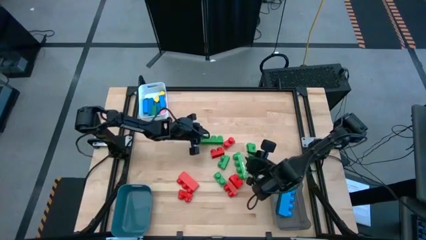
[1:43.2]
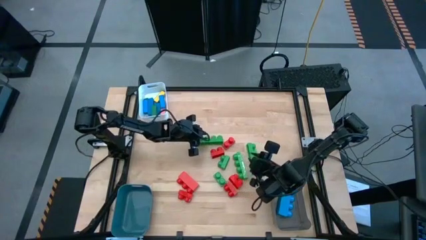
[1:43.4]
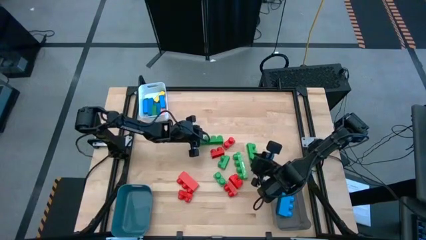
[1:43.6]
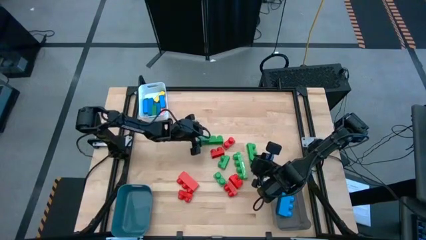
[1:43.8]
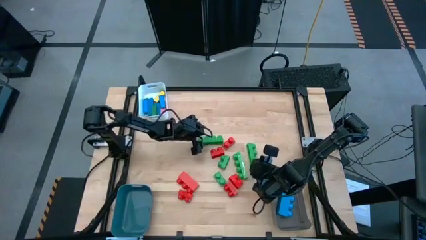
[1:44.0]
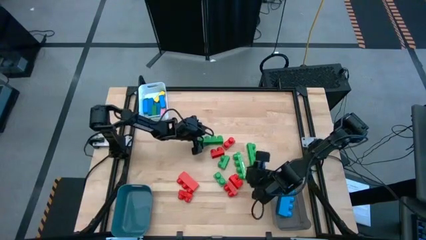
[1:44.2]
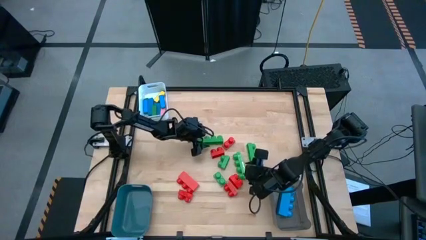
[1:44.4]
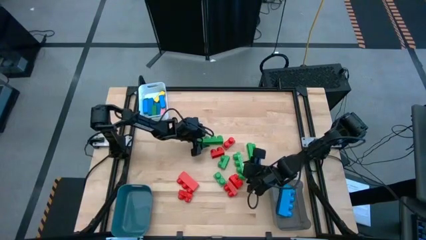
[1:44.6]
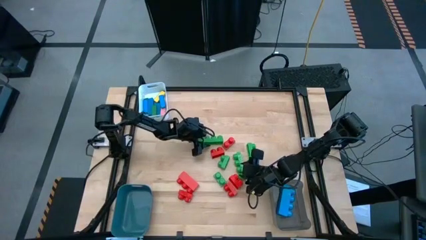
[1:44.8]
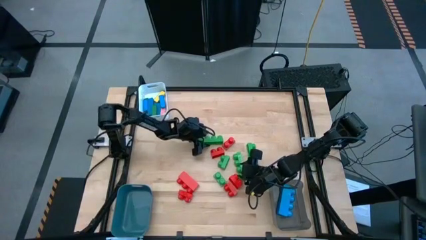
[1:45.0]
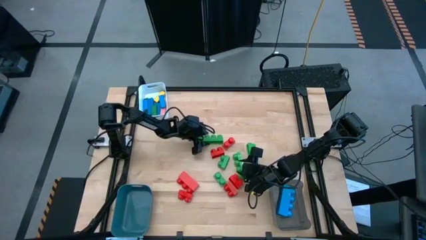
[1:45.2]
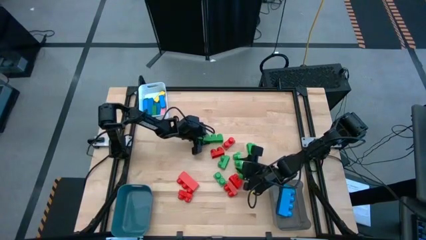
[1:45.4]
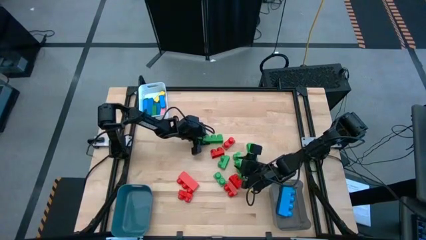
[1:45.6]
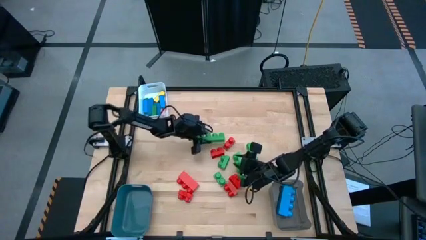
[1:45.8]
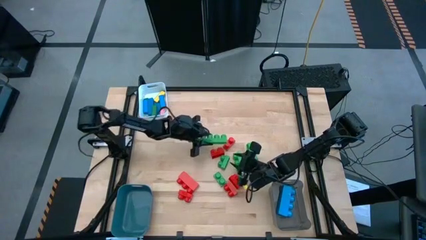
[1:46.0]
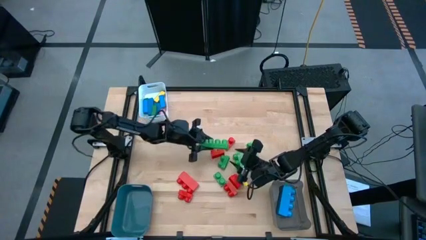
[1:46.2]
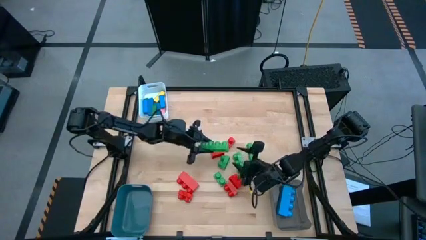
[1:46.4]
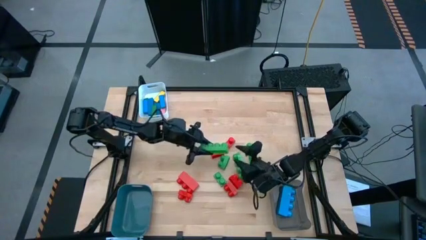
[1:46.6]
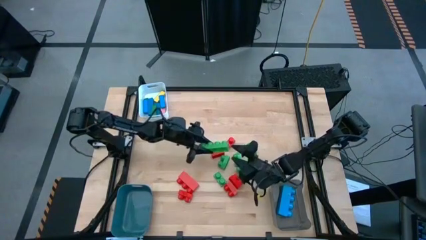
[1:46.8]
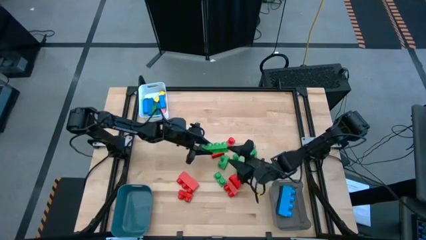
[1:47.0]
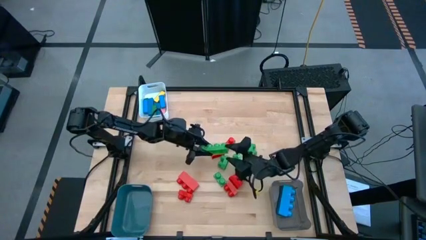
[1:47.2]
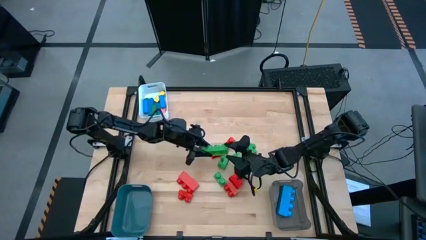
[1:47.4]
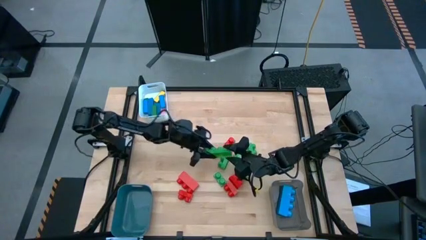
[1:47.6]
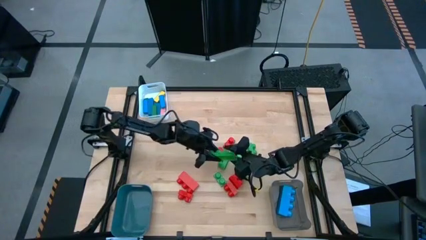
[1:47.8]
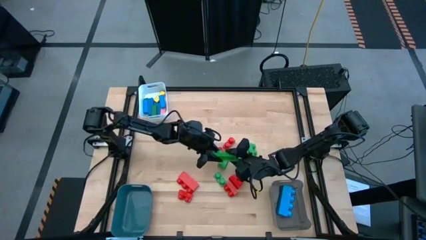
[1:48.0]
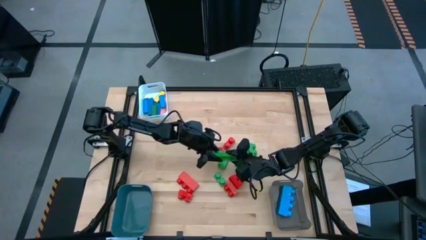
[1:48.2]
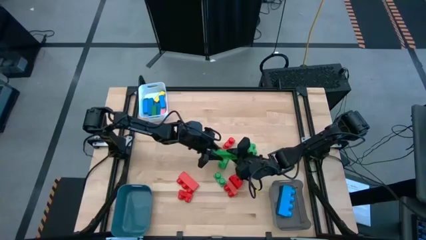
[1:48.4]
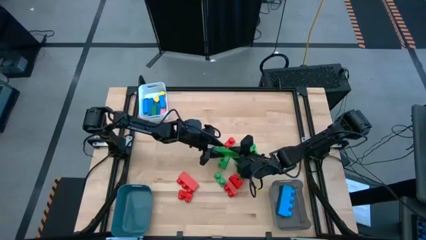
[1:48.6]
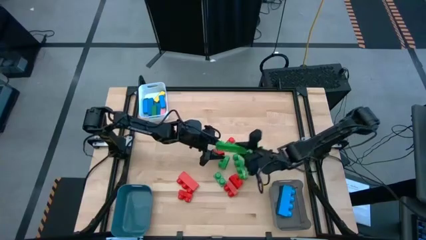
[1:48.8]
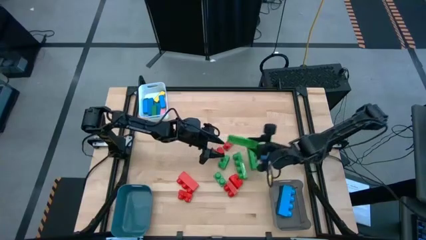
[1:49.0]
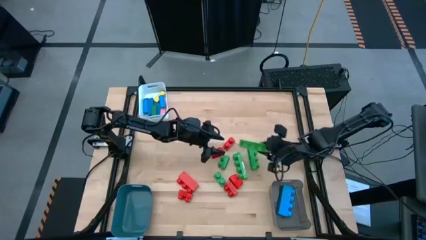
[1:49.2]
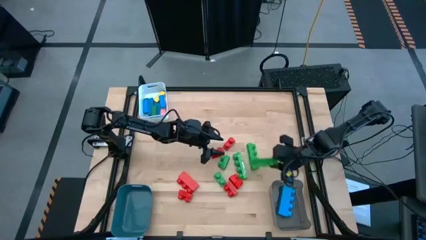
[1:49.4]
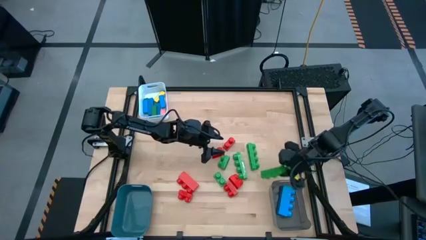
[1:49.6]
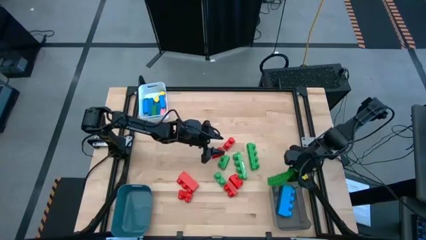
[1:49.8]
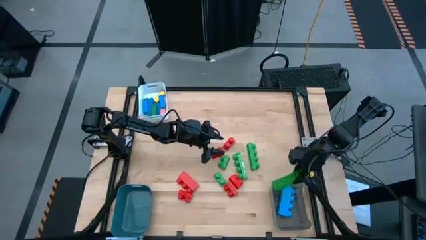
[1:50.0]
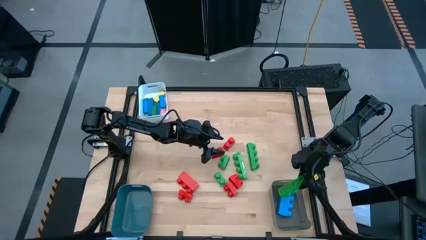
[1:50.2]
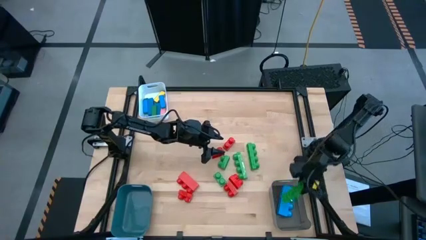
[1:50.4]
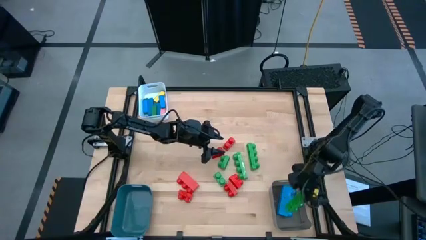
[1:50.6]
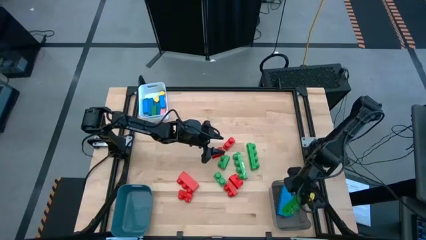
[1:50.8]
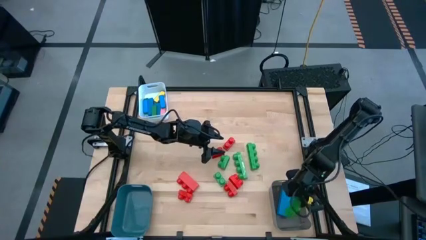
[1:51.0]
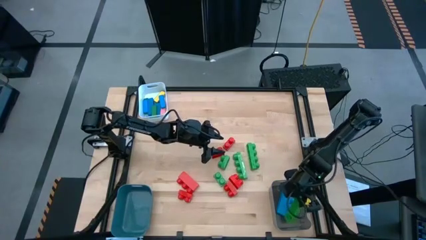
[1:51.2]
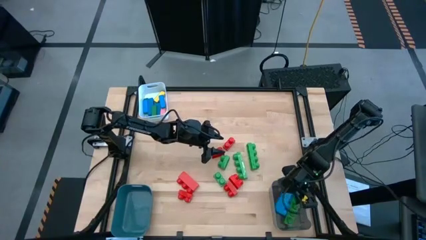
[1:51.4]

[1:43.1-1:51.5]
Task: Sort blocks by size
Put the green 4 stud gamepiece into the black bin

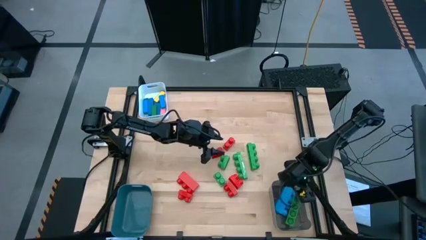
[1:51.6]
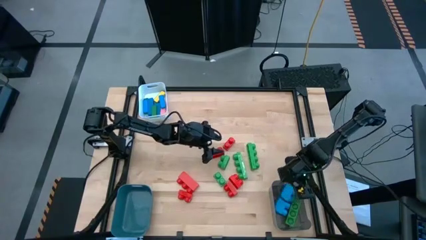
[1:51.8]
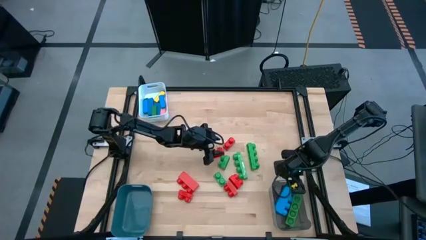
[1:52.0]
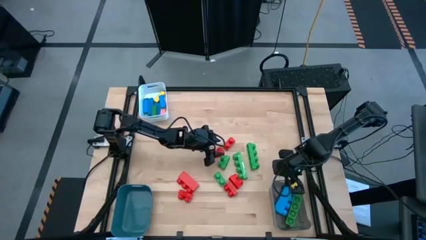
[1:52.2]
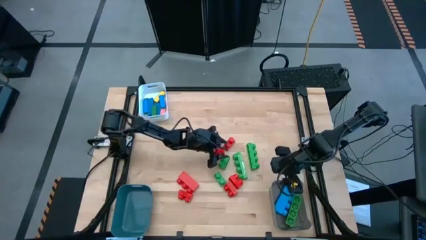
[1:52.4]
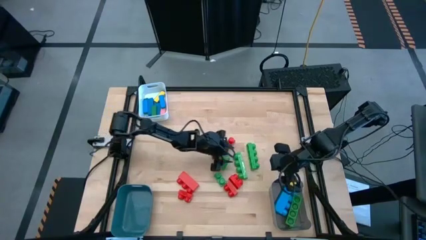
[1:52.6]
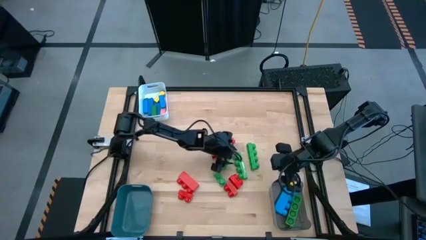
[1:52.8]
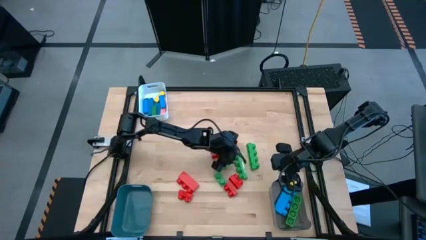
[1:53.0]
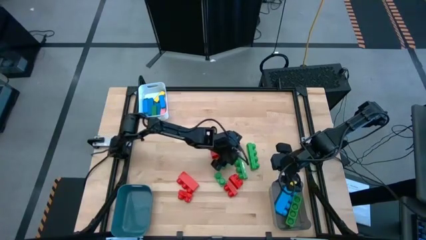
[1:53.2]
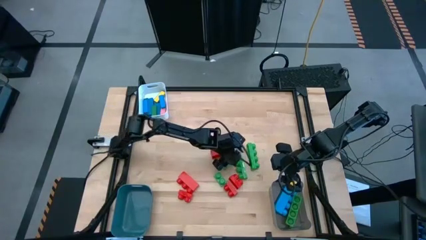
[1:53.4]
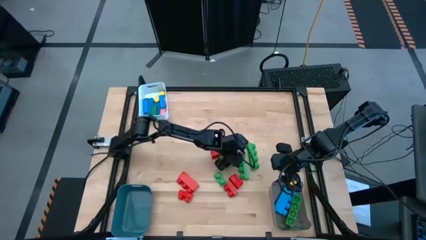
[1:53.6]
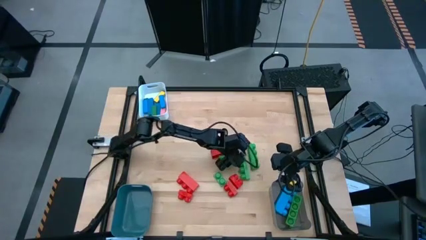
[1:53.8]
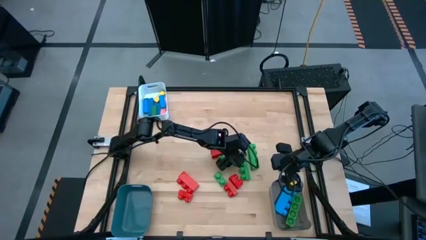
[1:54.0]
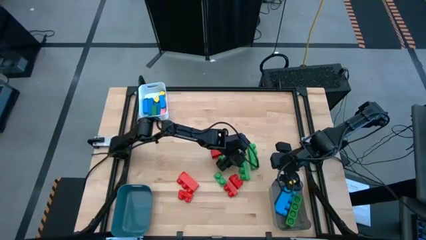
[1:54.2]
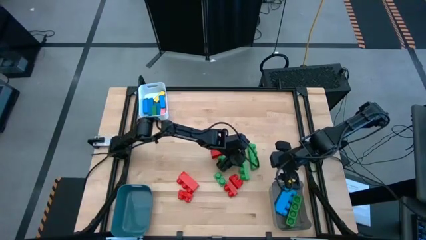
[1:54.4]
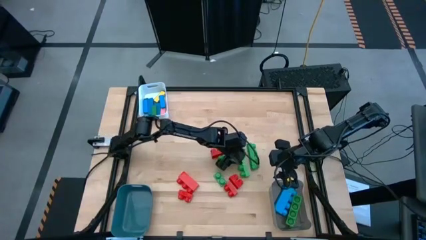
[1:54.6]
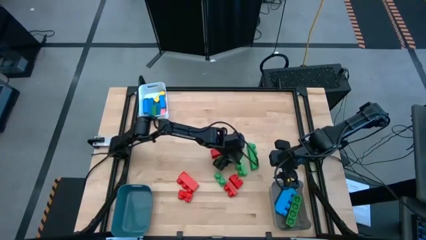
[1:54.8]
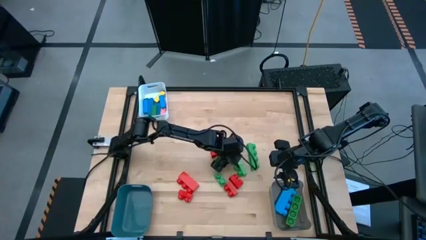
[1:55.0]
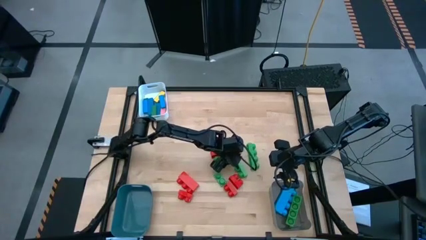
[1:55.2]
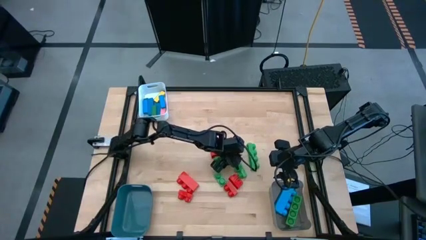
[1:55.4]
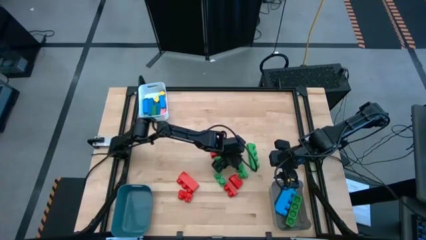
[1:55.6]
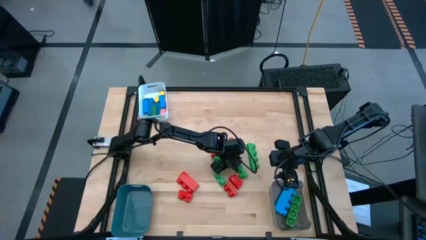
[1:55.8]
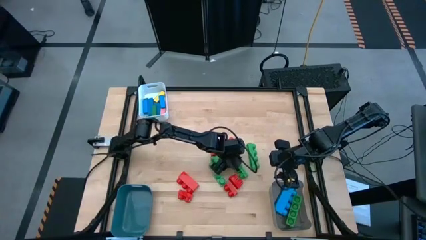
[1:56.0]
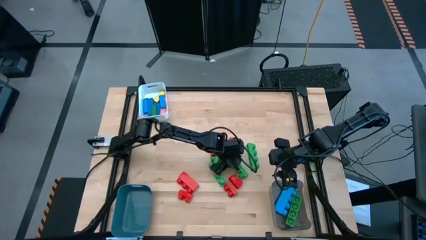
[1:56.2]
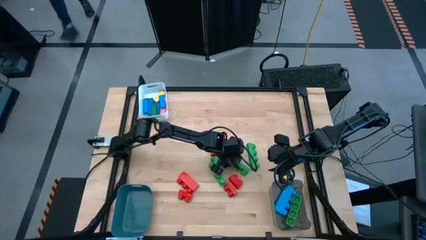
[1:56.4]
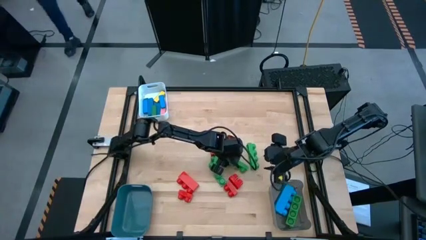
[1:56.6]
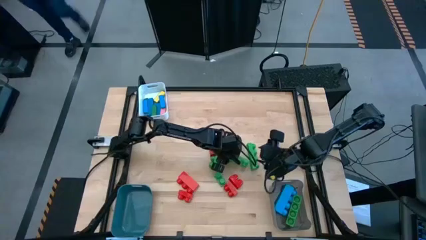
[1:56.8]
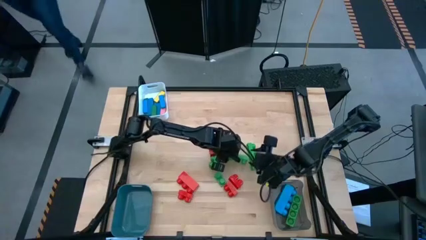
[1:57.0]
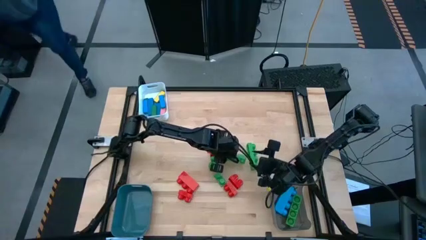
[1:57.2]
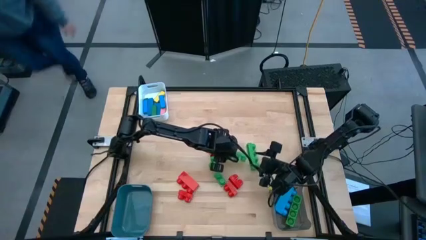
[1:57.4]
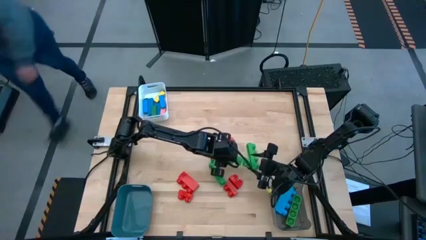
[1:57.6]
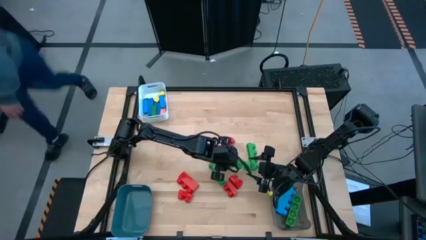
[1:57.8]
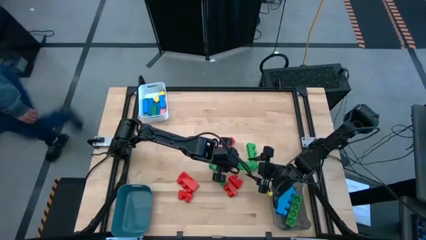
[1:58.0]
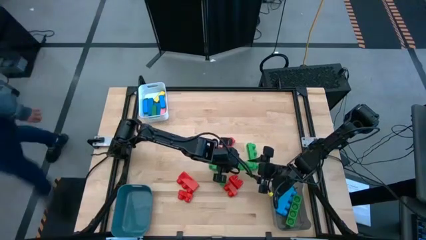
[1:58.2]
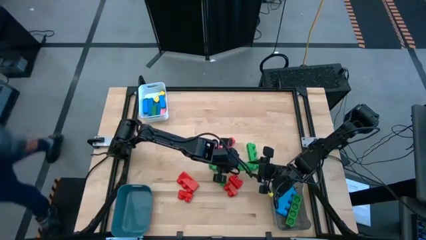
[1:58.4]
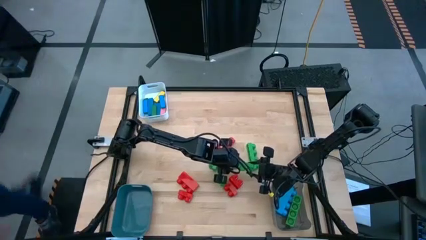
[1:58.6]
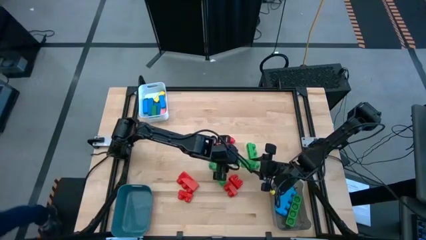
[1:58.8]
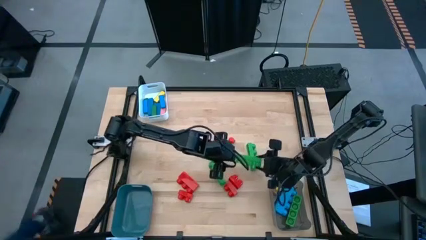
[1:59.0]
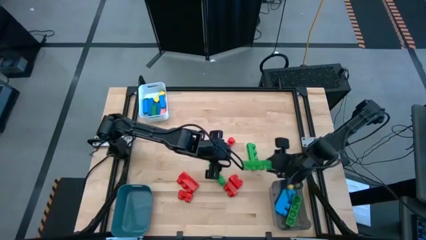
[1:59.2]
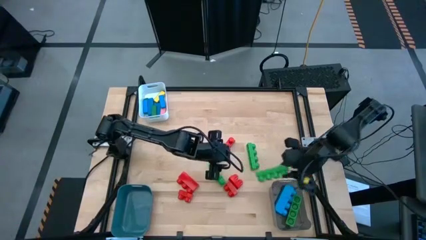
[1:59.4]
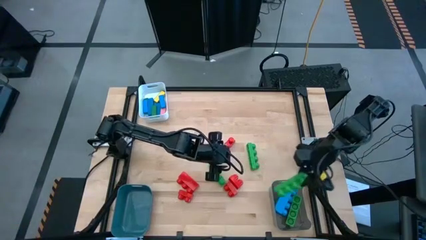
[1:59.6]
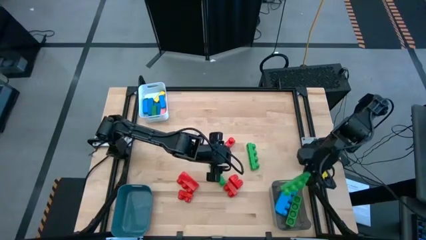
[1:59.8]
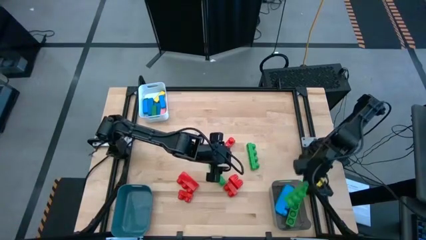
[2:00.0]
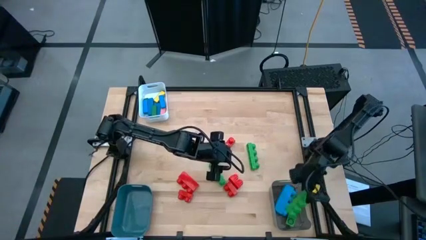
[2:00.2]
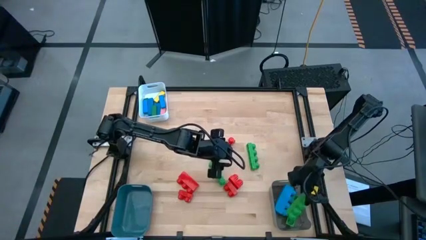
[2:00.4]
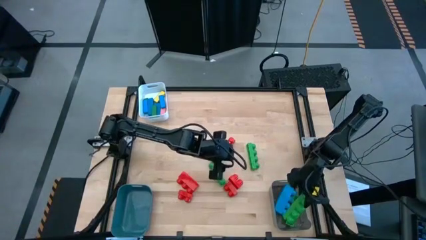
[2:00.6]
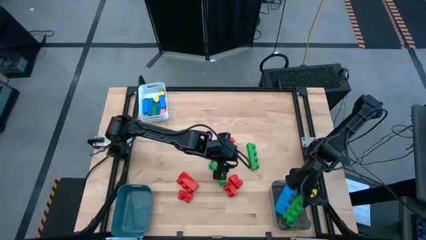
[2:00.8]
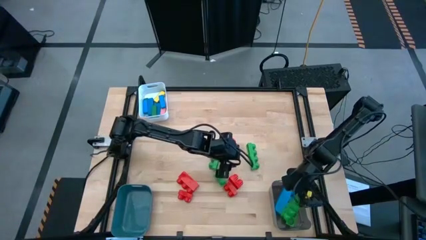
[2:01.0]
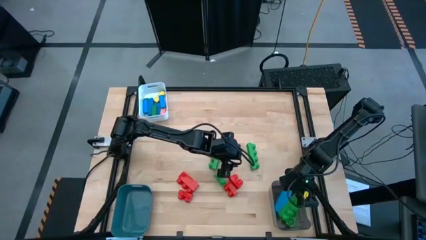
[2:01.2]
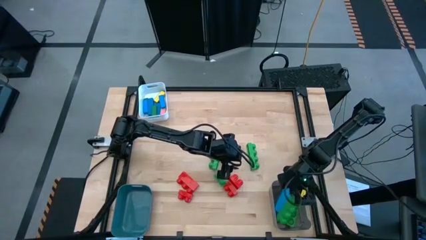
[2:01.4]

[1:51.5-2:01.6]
Put the green 4 stud gamepiece into the black bin
